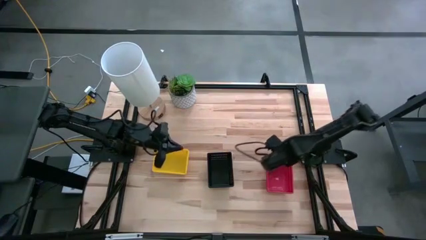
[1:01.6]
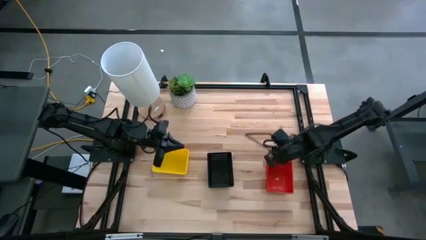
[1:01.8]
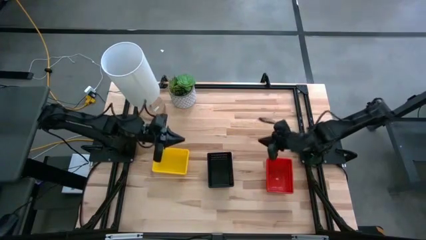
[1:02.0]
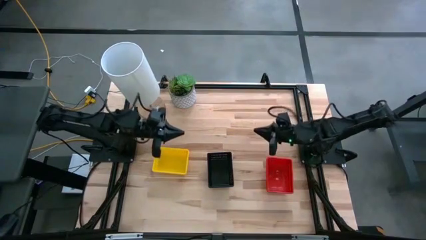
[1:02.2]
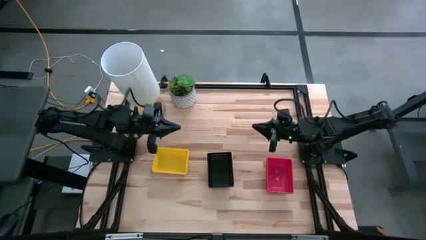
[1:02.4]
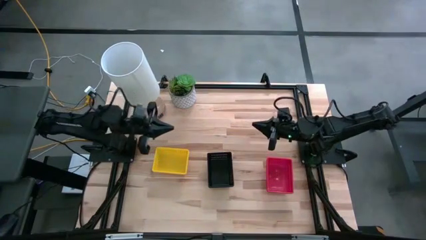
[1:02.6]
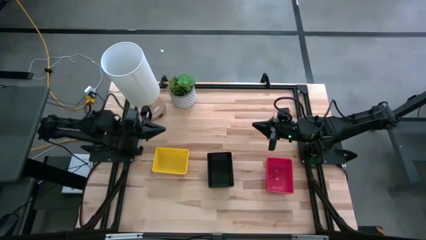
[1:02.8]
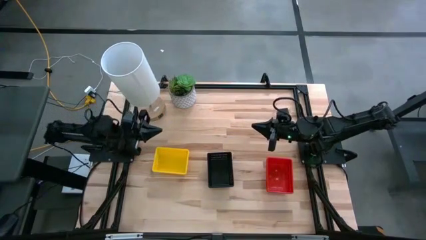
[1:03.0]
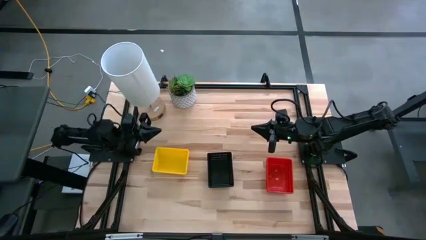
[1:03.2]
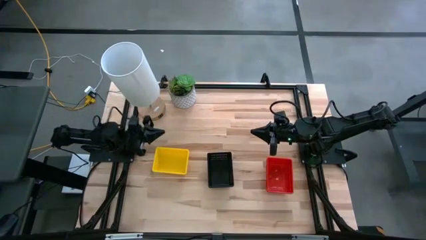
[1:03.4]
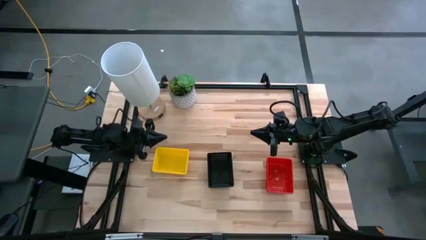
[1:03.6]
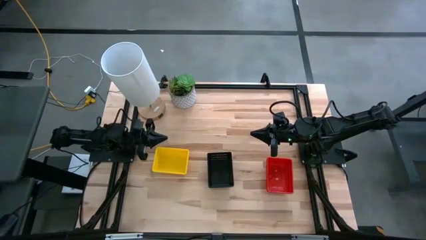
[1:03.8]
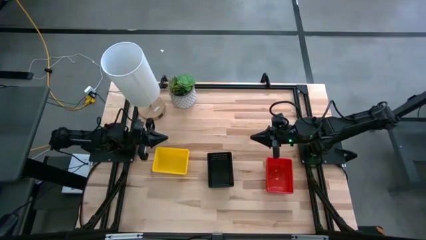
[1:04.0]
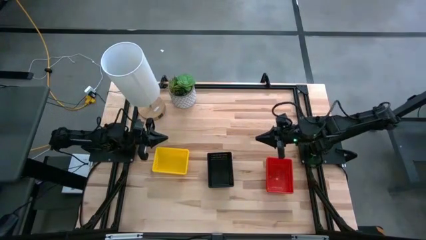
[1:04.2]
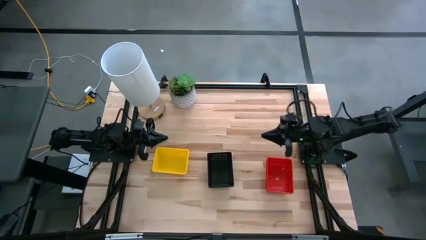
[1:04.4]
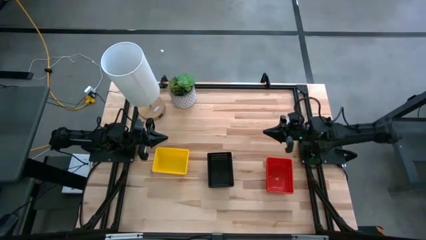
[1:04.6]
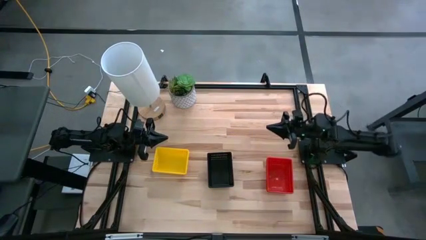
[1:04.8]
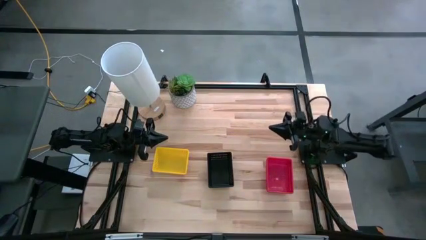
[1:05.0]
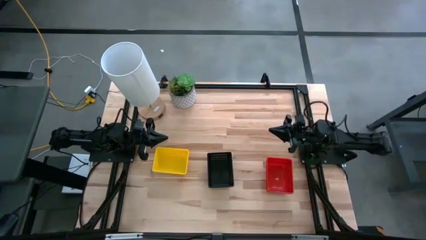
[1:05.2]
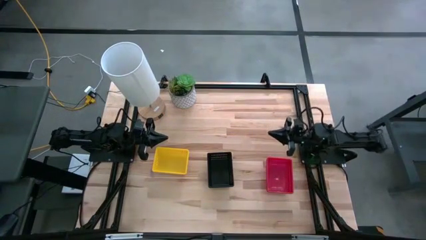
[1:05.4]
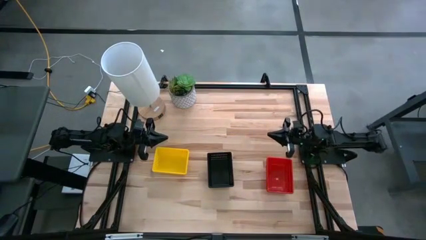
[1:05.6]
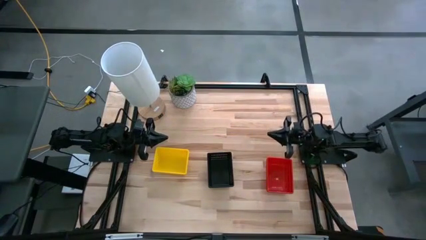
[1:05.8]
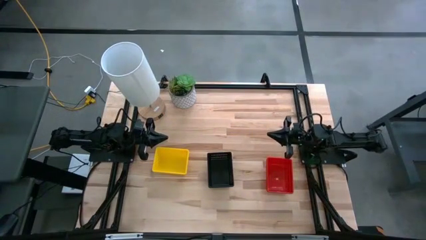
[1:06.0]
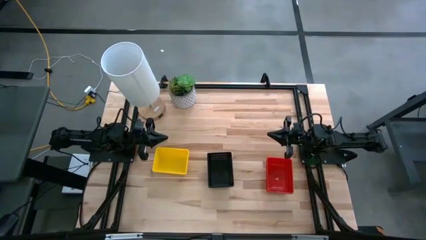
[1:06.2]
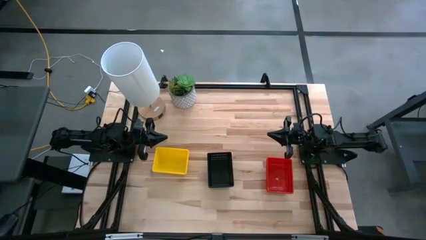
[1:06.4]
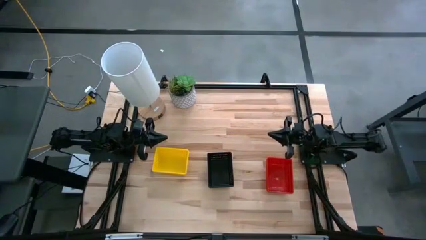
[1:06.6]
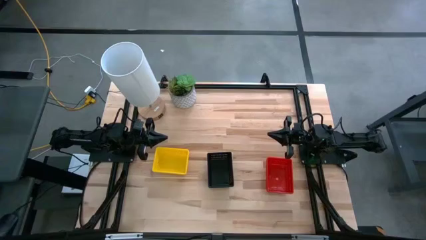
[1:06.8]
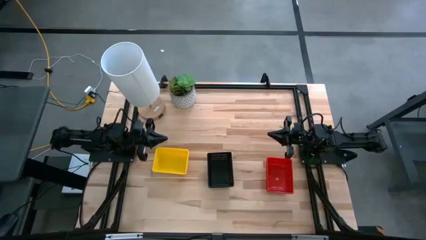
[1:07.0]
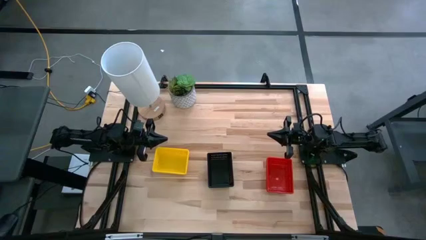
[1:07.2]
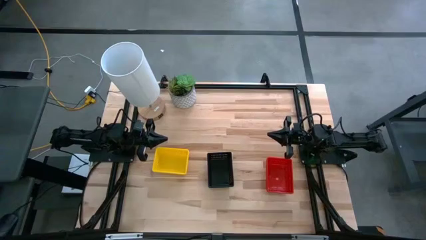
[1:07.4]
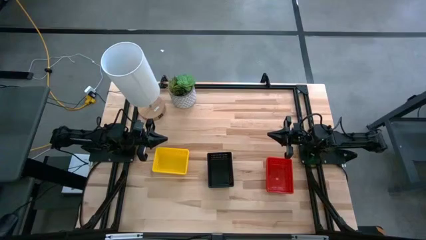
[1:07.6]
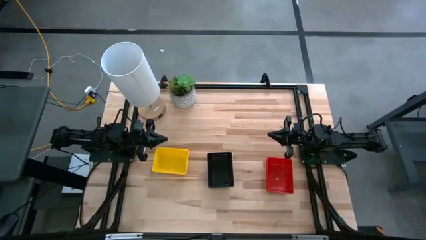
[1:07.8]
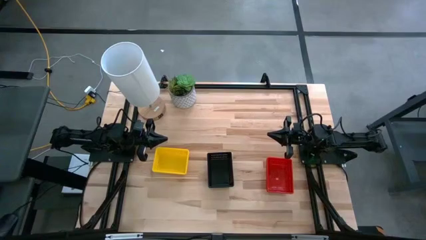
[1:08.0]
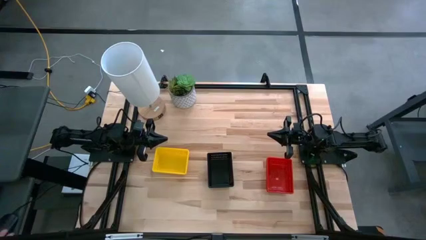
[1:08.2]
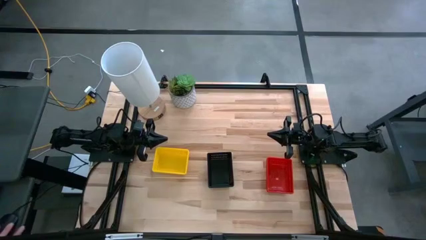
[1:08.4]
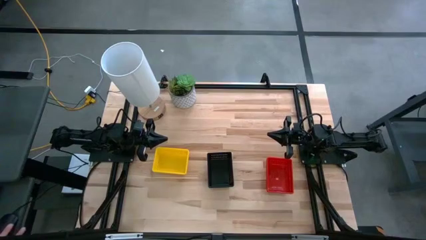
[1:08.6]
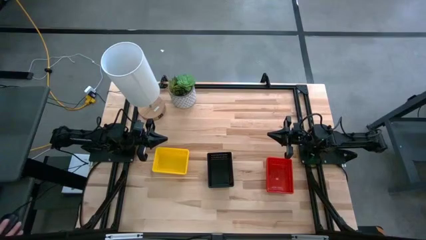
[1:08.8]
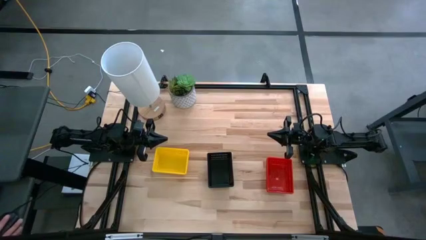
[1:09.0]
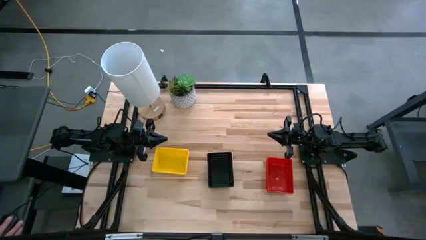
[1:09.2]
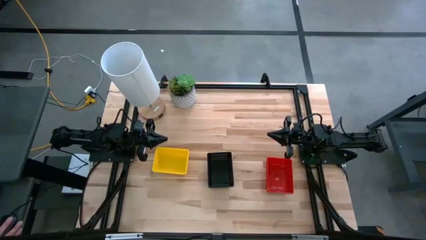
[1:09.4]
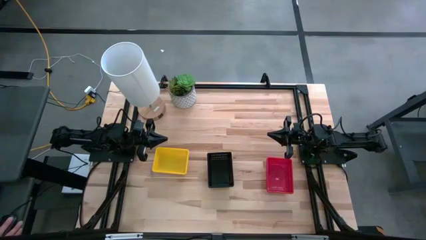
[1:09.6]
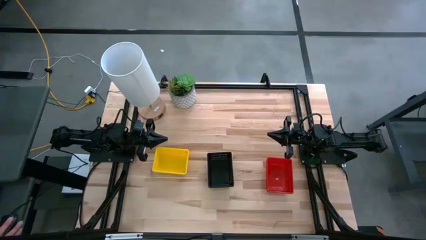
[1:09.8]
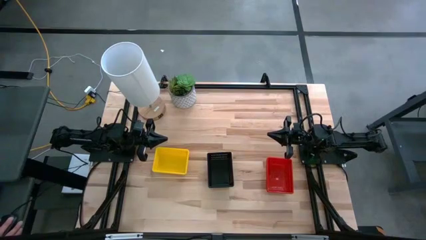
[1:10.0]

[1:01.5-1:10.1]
Return to Home Position

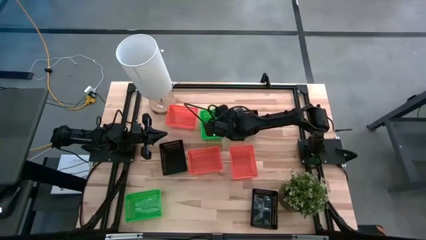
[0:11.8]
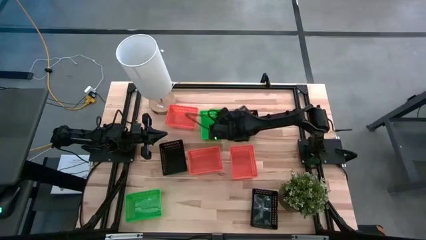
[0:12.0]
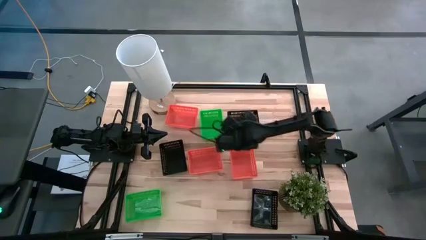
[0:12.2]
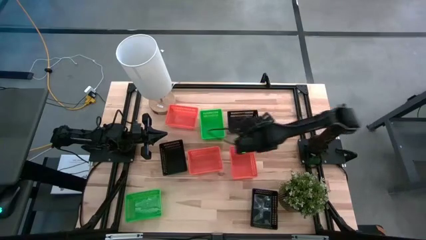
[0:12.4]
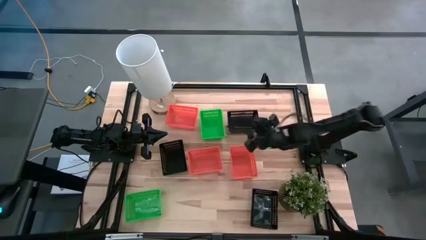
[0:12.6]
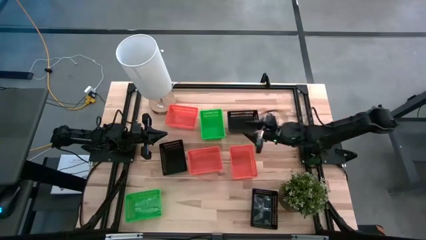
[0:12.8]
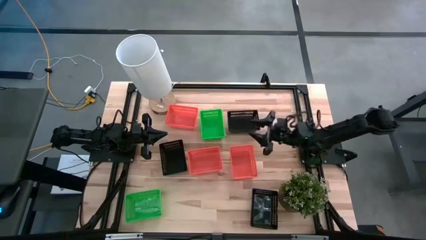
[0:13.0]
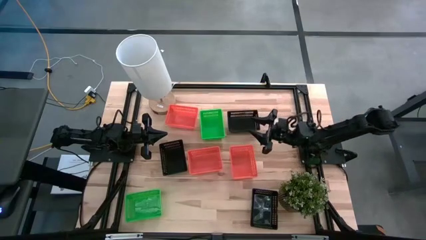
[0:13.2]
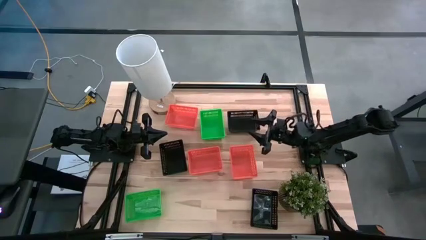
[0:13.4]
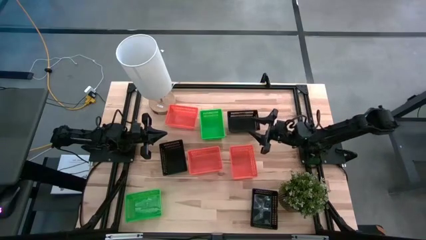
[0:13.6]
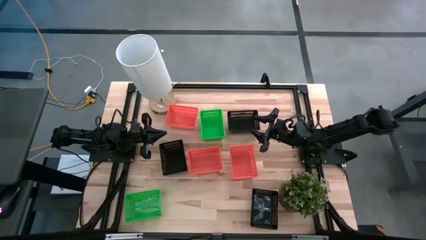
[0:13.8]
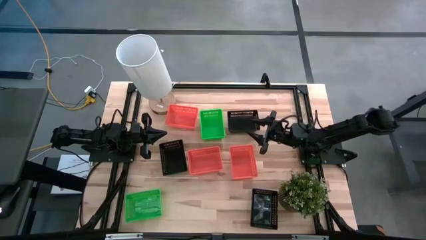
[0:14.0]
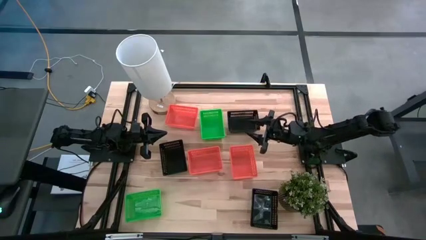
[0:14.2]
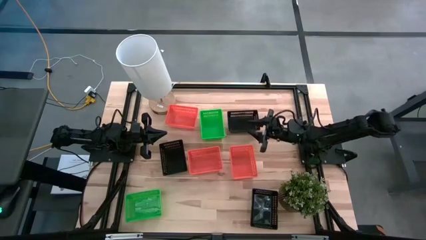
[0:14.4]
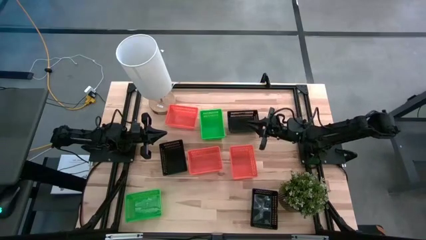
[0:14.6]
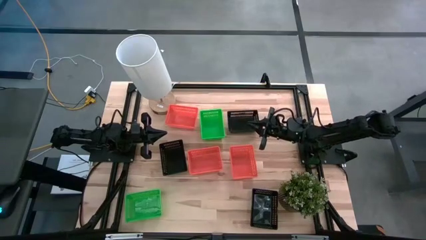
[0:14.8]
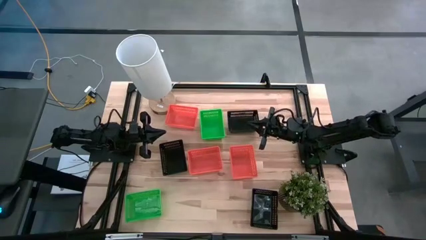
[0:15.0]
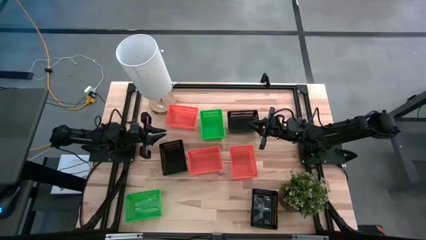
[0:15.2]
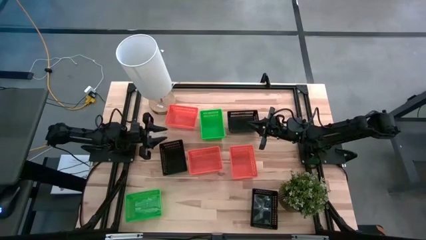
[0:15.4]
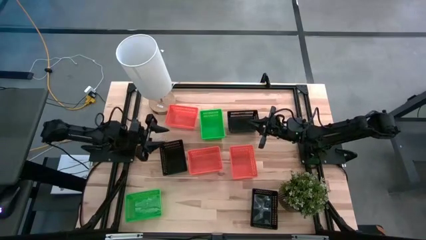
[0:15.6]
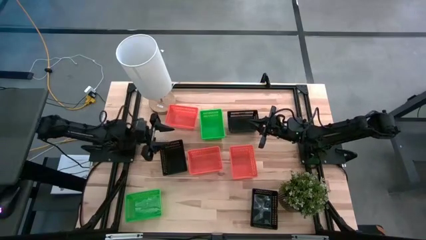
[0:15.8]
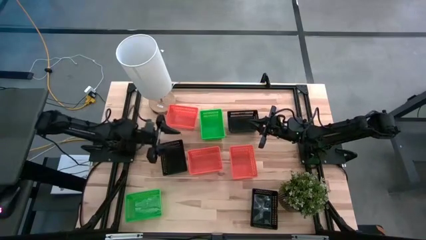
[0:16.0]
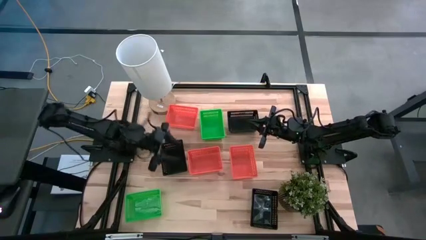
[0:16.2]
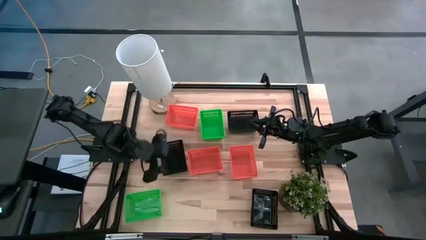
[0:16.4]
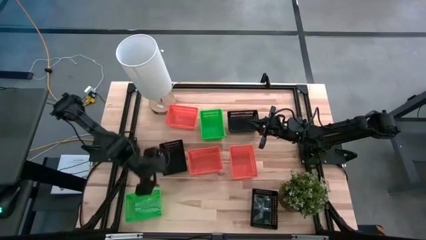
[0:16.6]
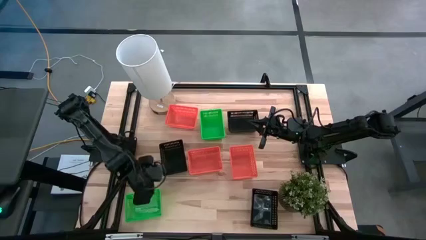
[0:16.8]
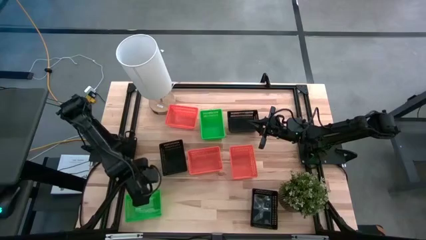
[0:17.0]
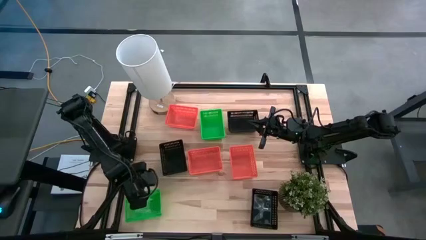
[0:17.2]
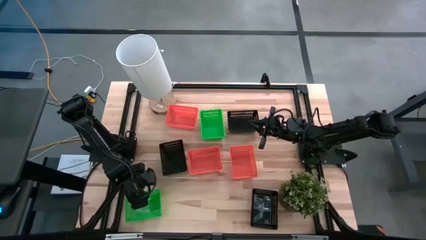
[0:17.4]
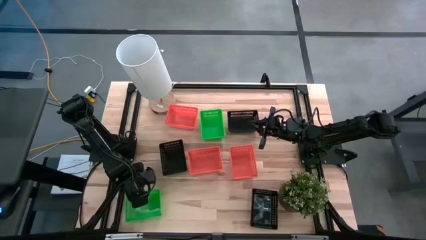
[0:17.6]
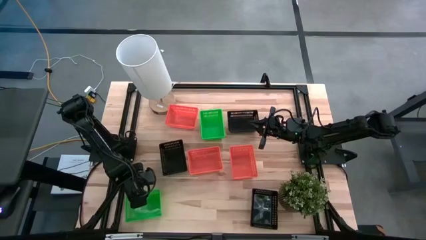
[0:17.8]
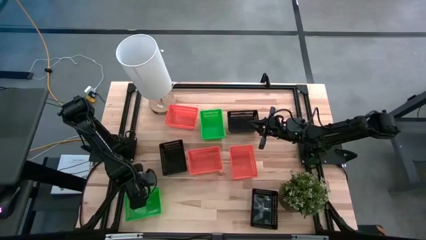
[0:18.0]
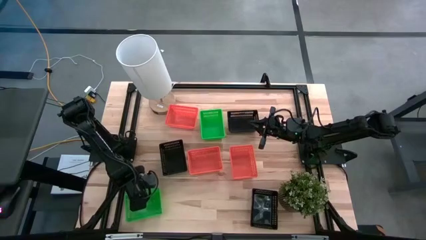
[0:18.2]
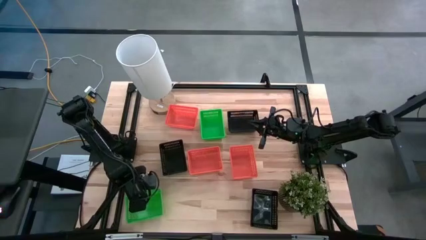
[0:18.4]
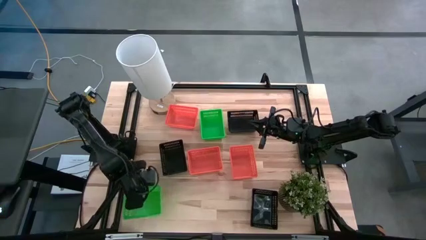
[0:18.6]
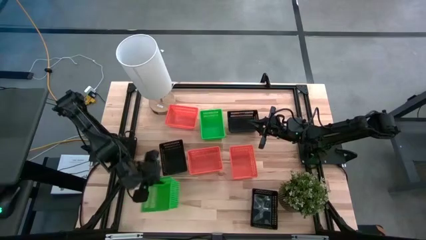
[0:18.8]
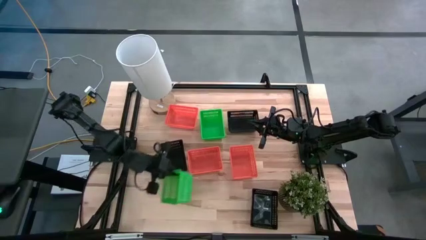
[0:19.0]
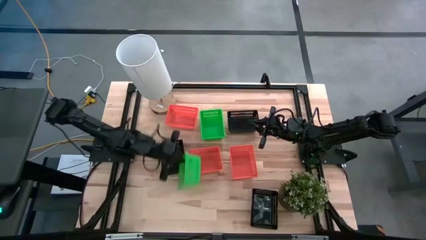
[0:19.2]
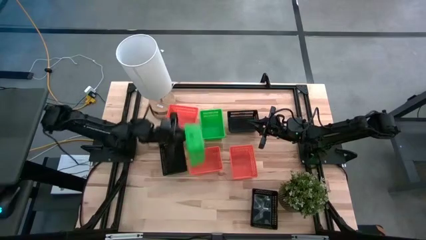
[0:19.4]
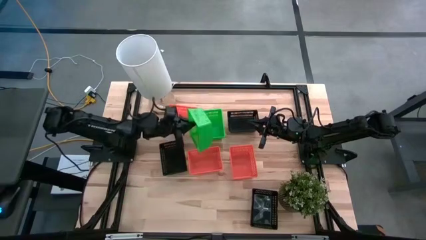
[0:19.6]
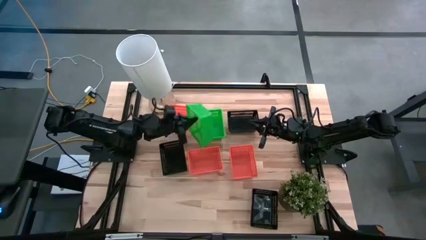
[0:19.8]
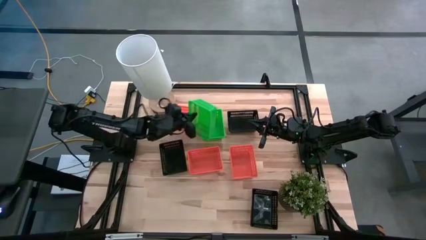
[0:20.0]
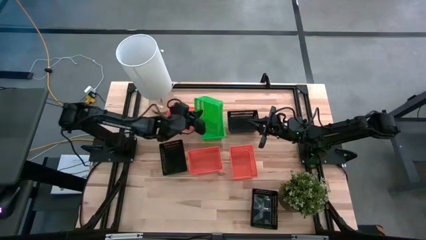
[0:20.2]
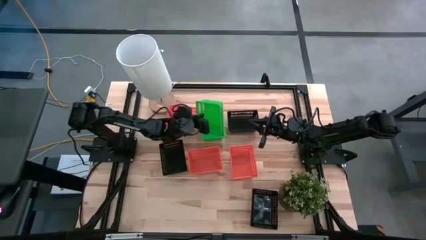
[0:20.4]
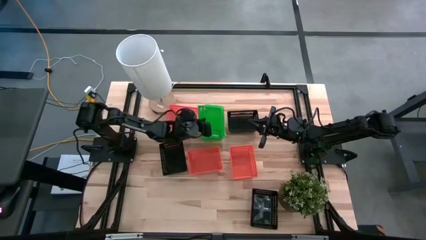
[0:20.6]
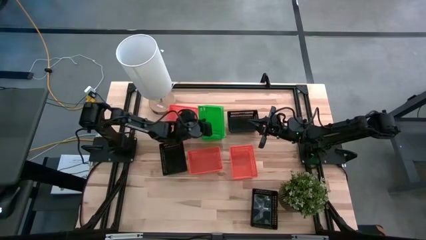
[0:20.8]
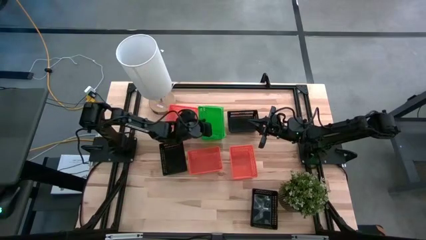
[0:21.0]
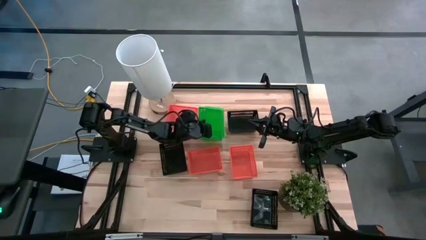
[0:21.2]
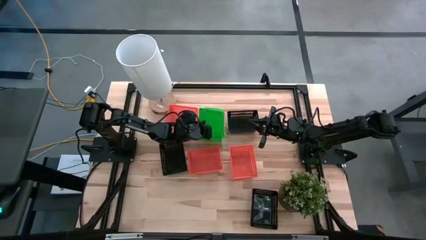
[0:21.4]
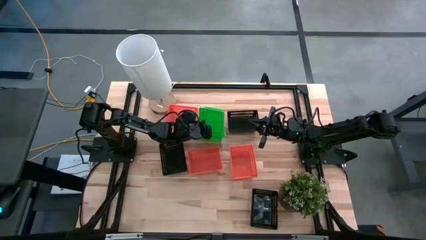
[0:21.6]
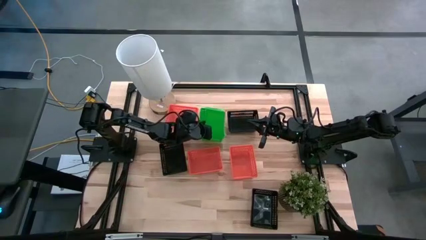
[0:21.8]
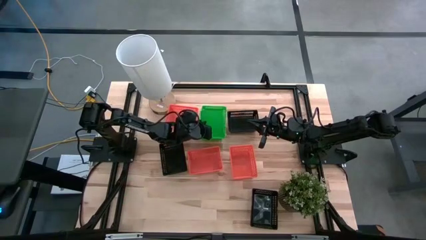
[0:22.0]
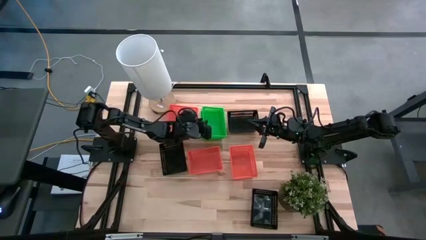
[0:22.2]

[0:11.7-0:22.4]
Stack the bottom green bin on top of the top green bin
